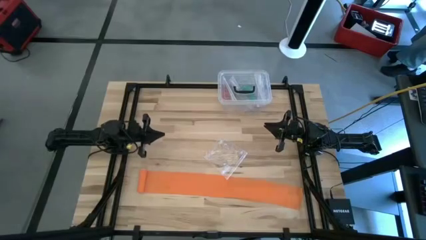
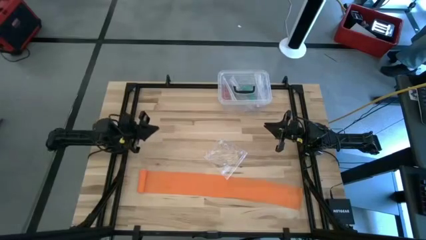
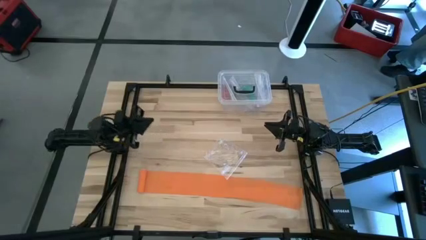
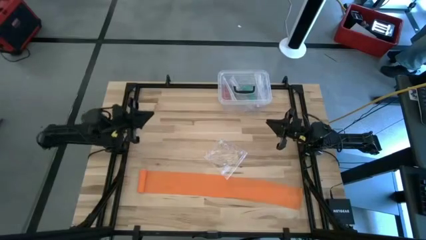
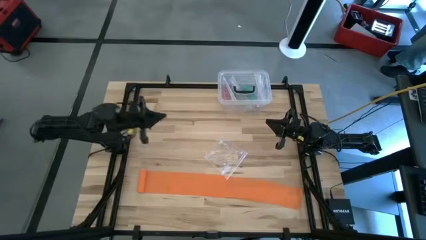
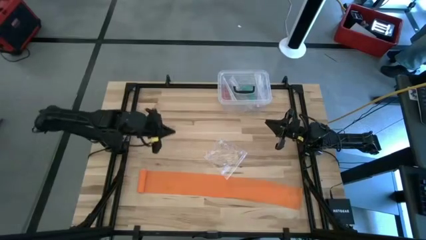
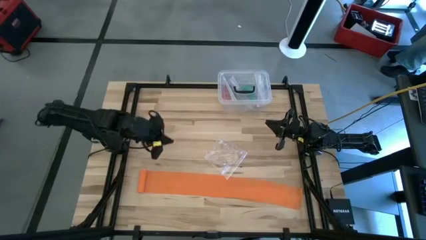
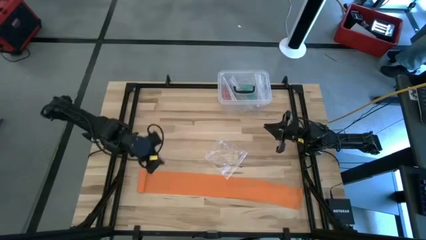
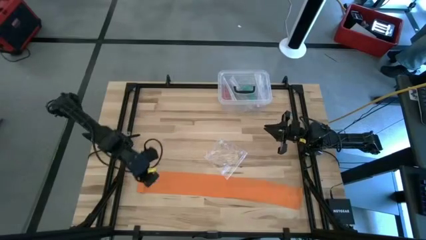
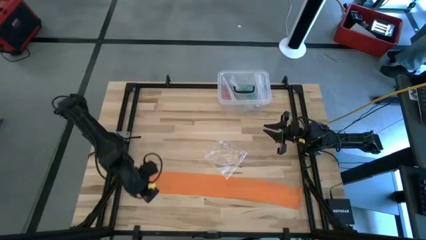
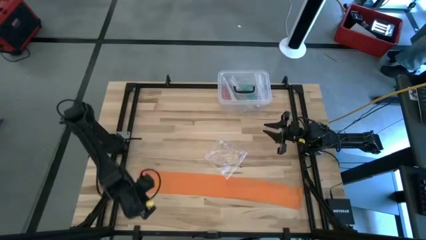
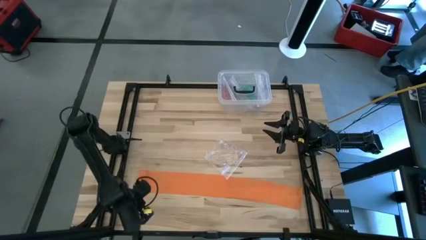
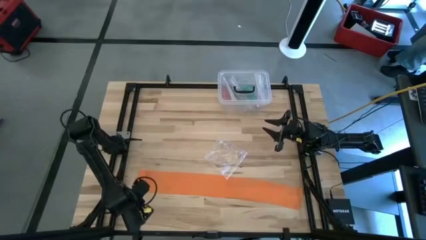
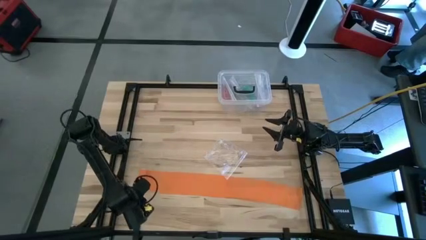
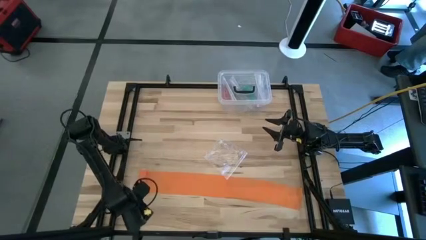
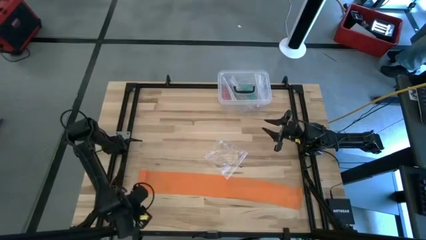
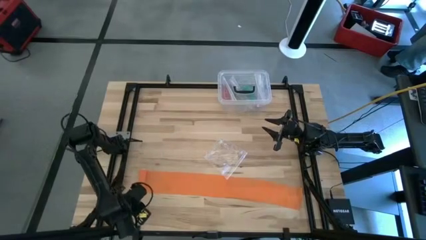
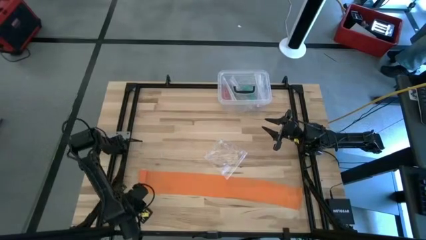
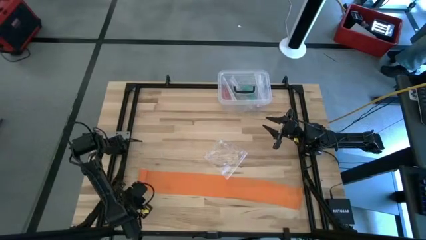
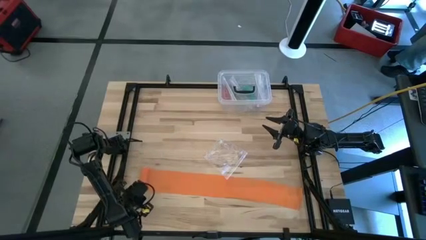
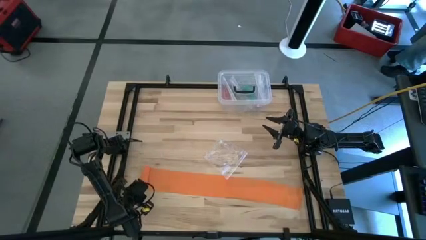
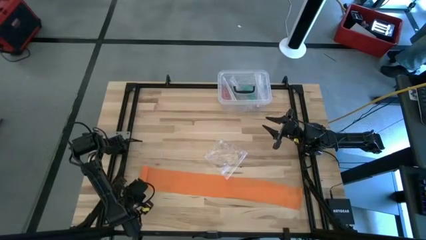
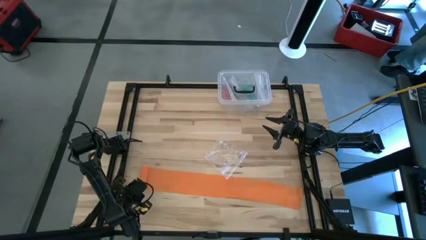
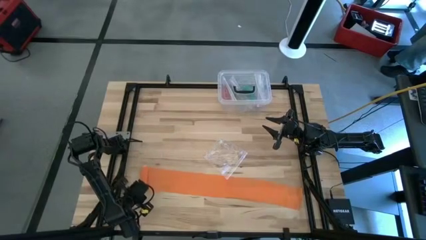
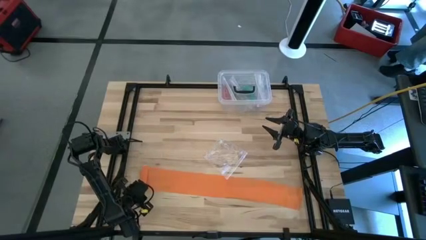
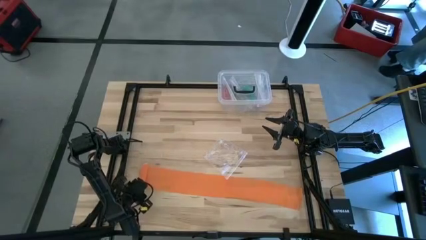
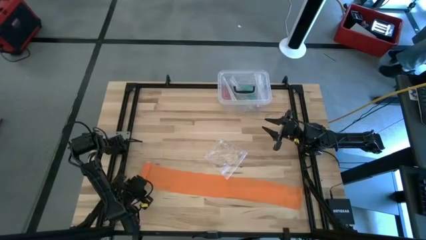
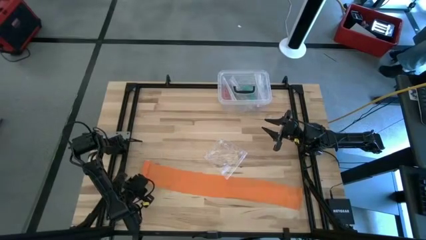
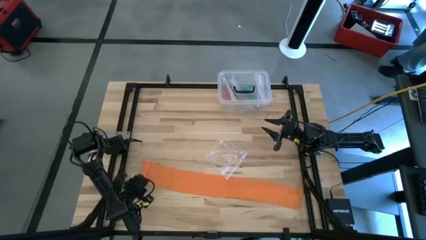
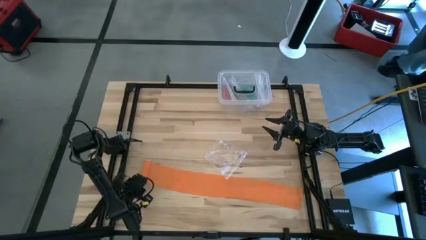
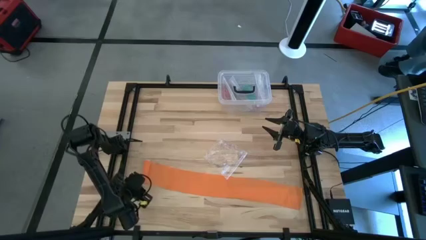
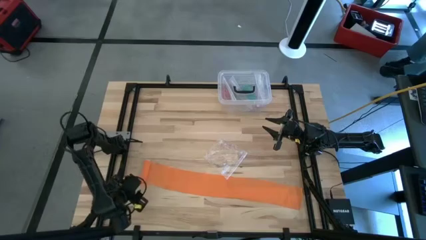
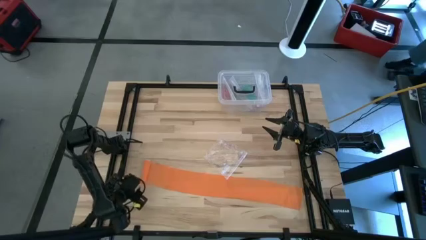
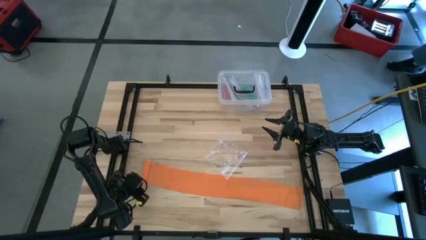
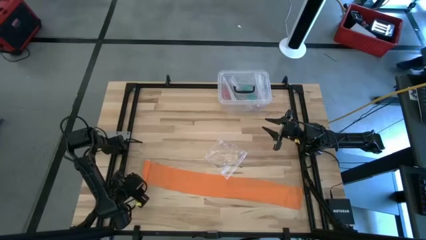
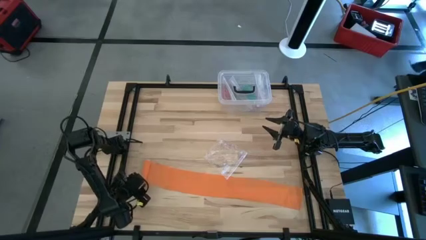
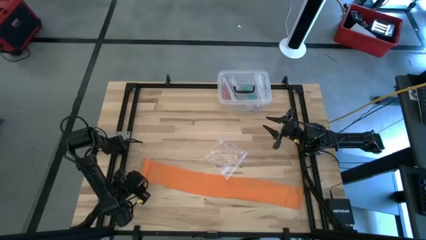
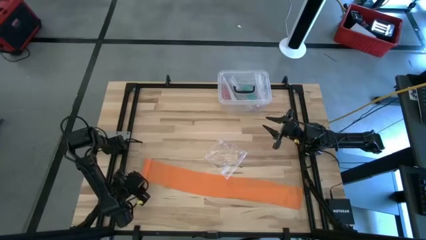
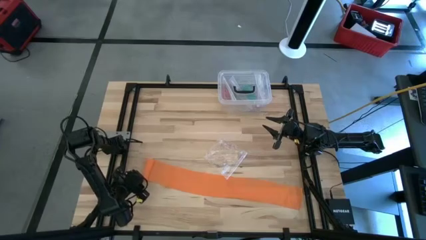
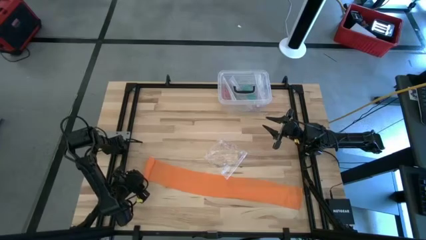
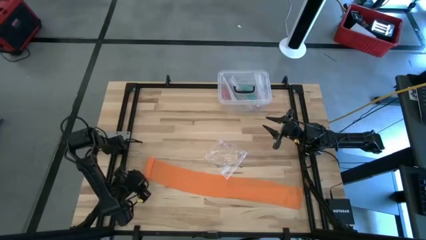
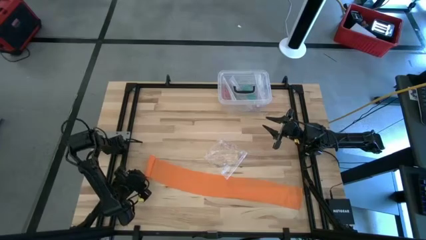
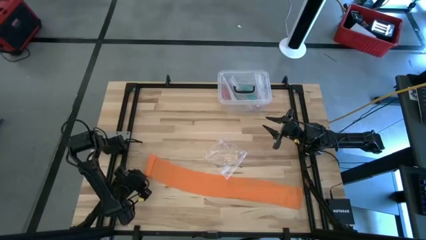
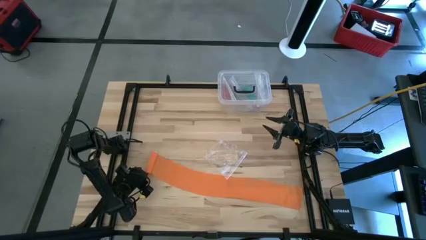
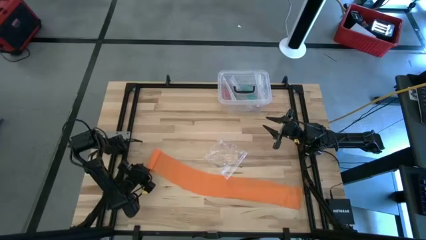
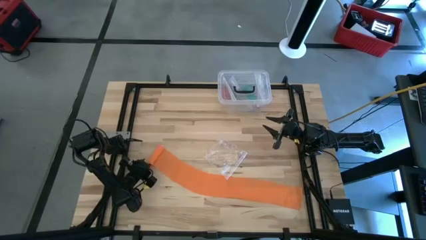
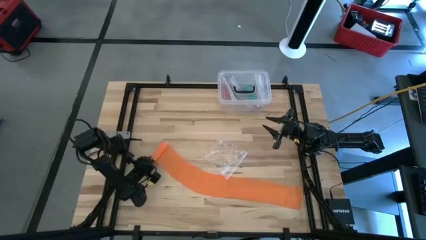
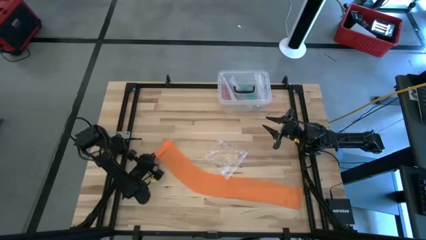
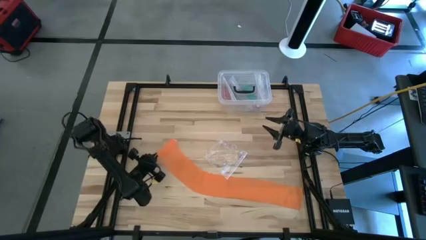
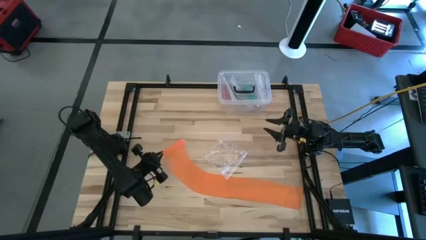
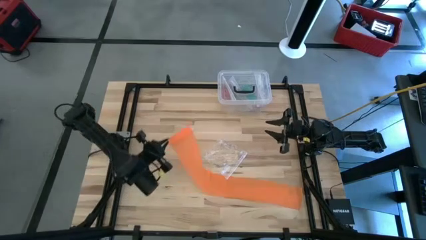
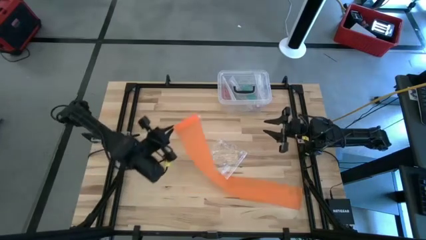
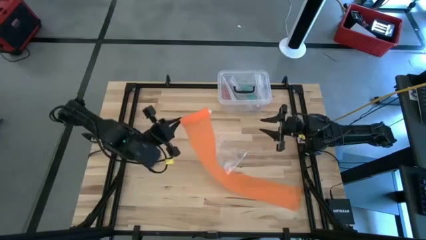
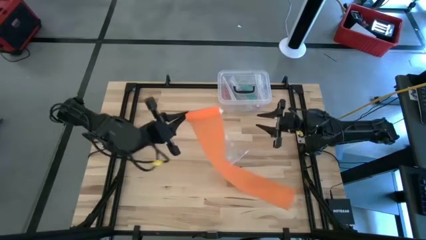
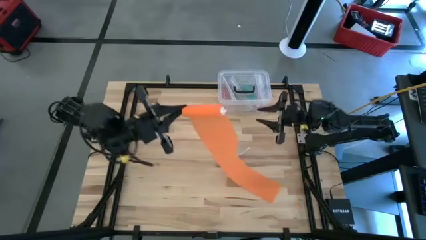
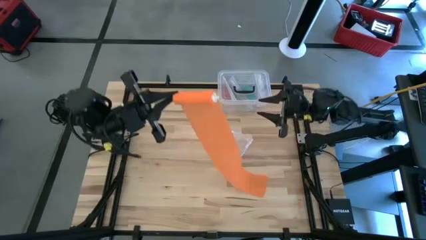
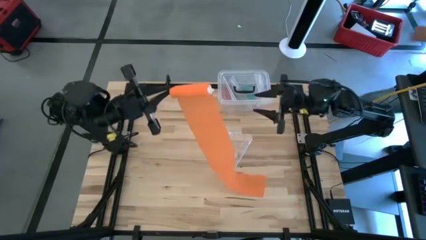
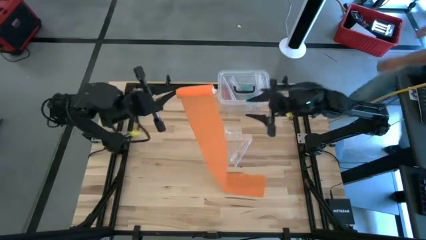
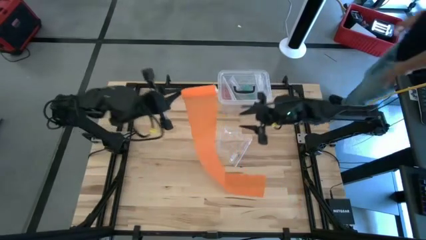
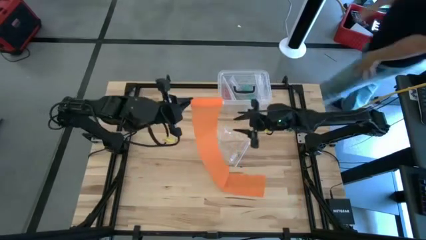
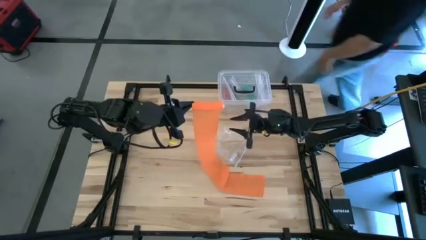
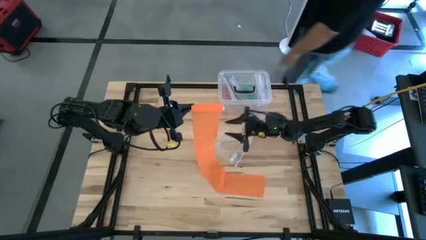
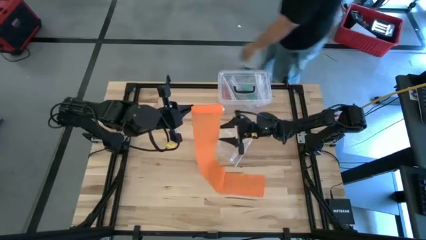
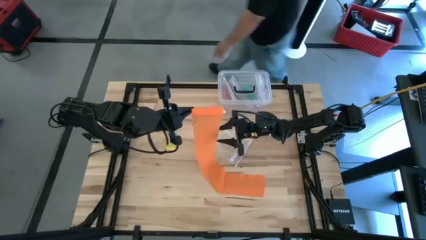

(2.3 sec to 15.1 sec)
Task: Roll bandage
Roll the orange bandage

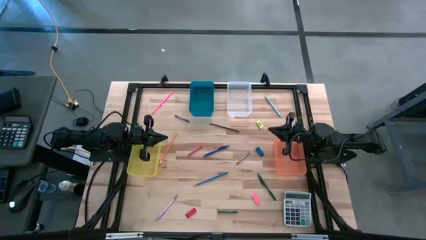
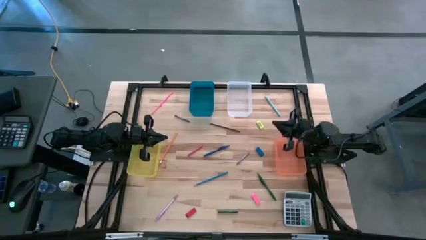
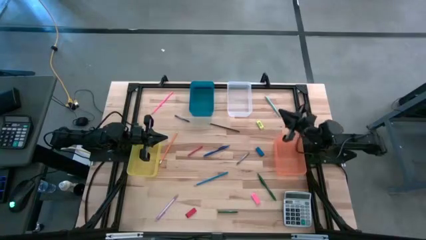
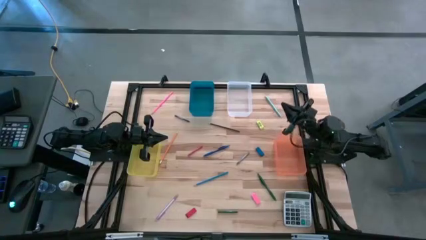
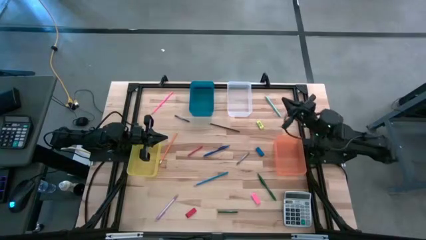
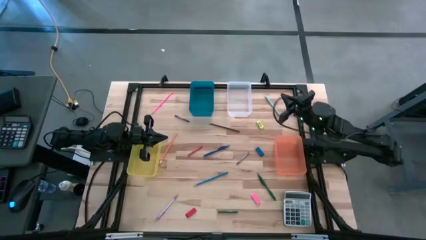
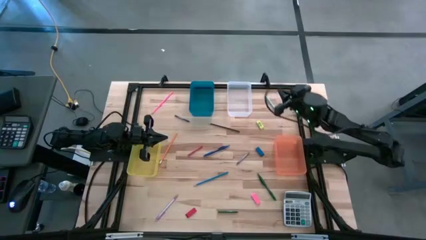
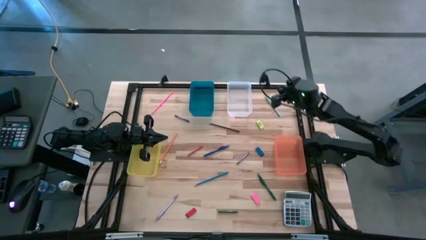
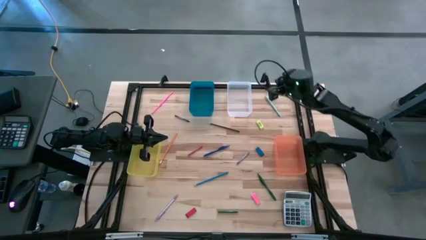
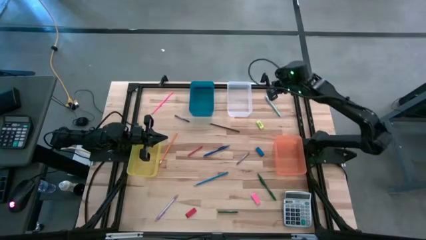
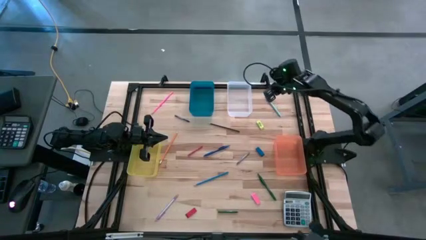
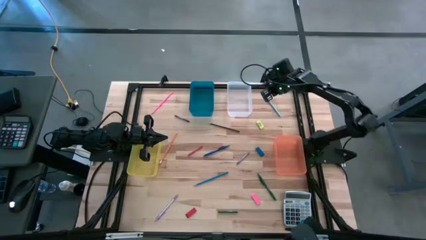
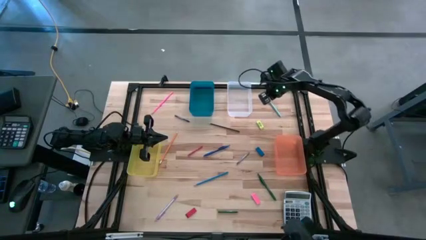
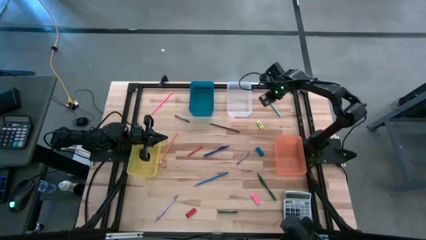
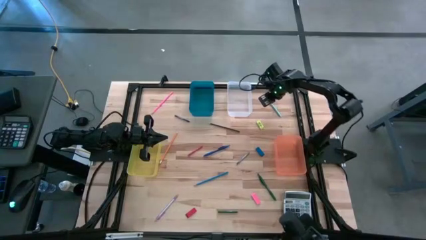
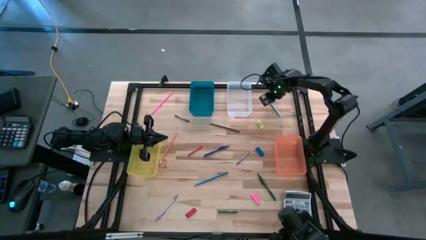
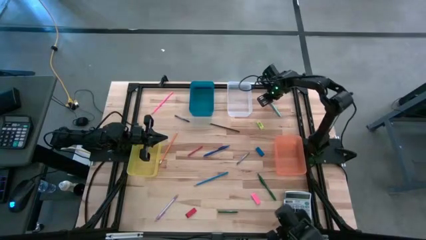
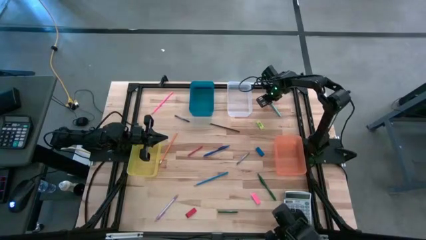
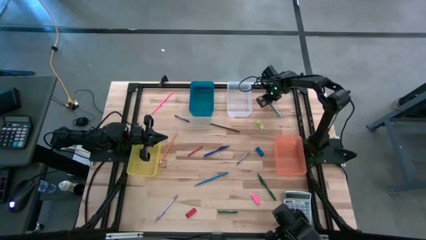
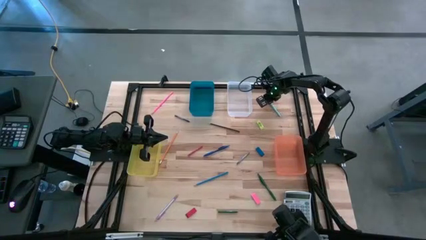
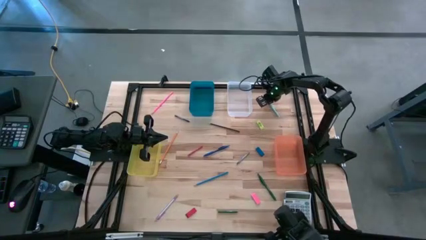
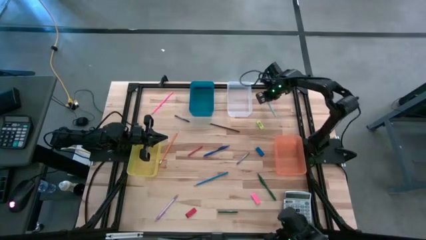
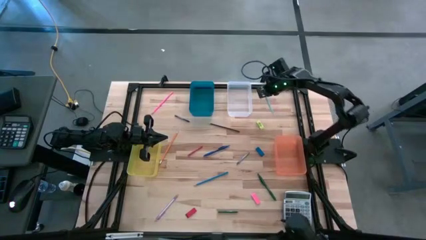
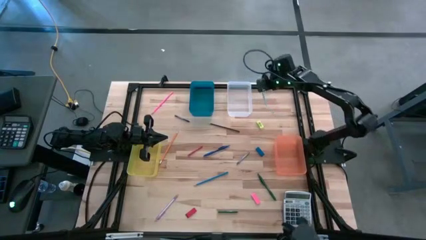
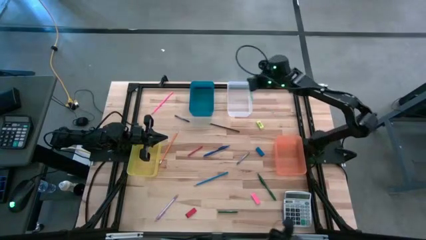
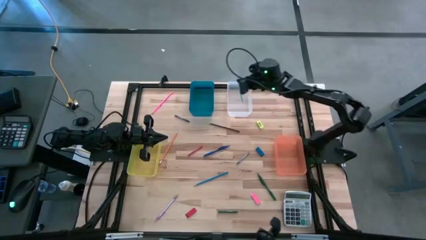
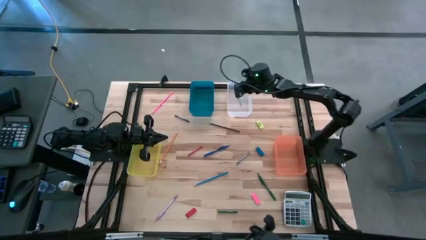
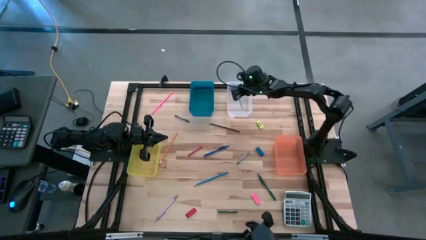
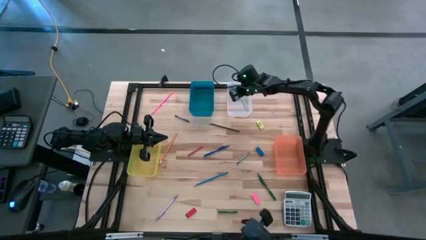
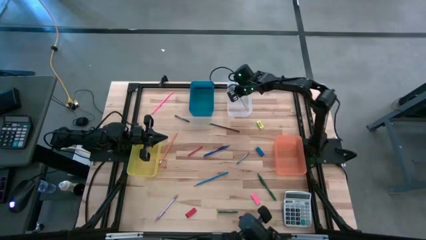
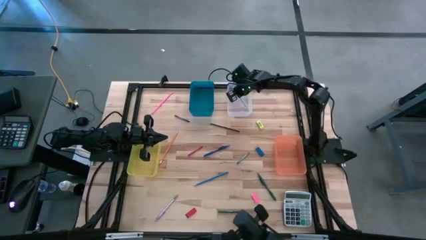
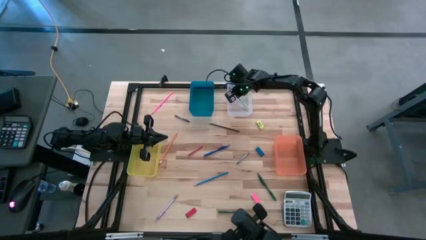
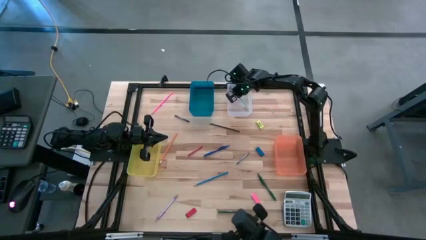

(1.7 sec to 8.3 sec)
Task: Sort crayons/erasers/pens/pencils in bins
Put the light blue ballpen into the white bin
